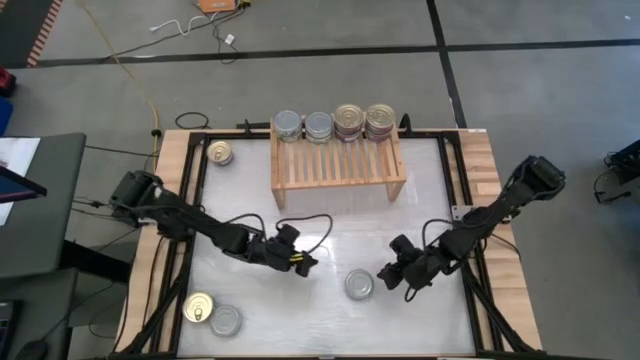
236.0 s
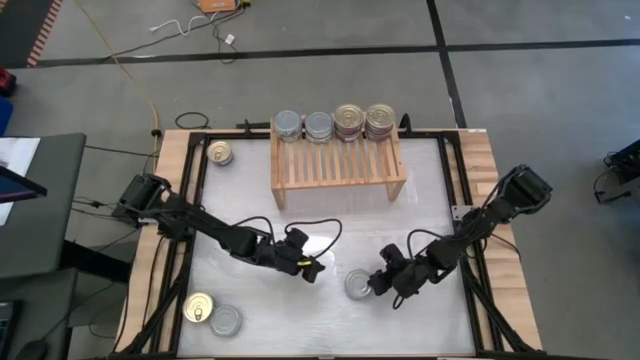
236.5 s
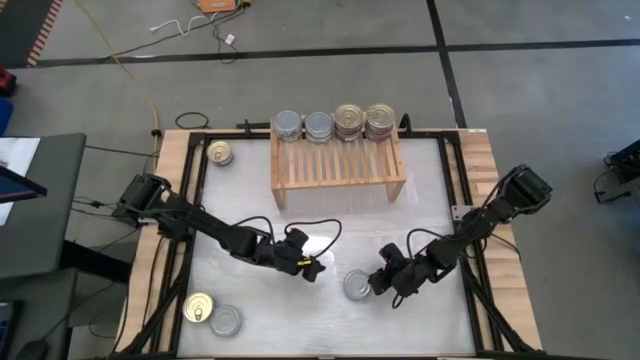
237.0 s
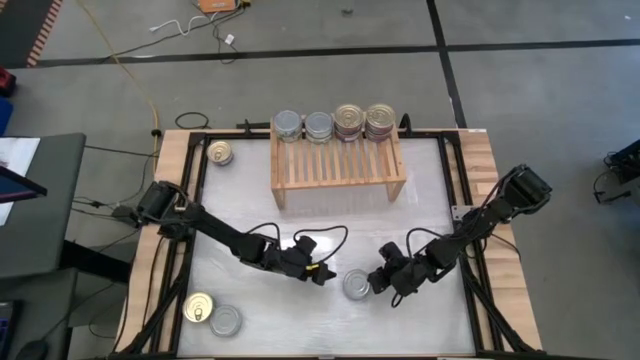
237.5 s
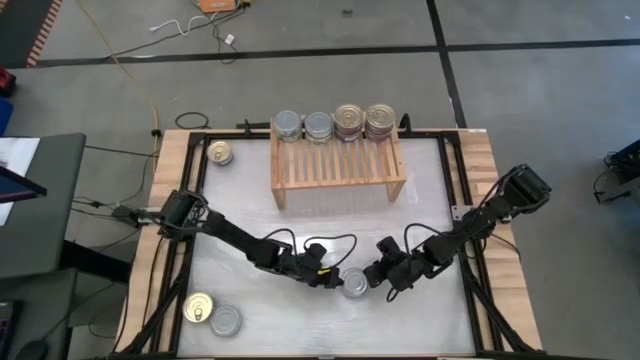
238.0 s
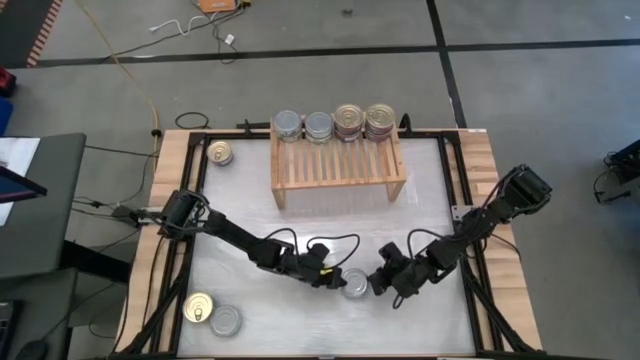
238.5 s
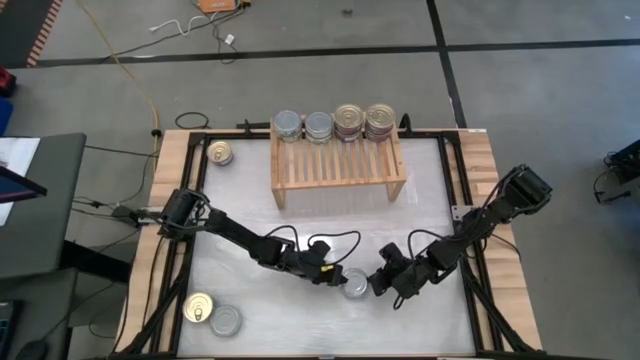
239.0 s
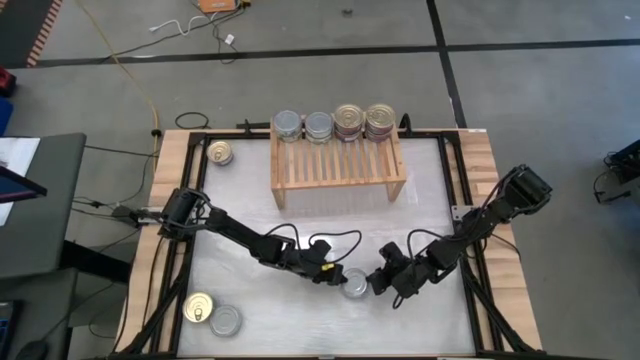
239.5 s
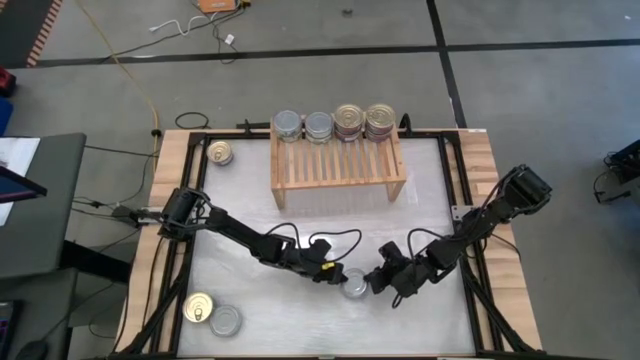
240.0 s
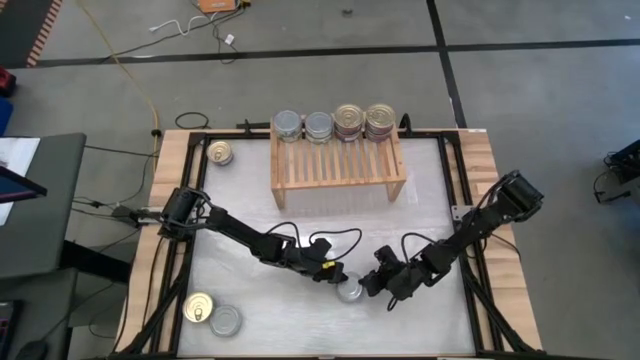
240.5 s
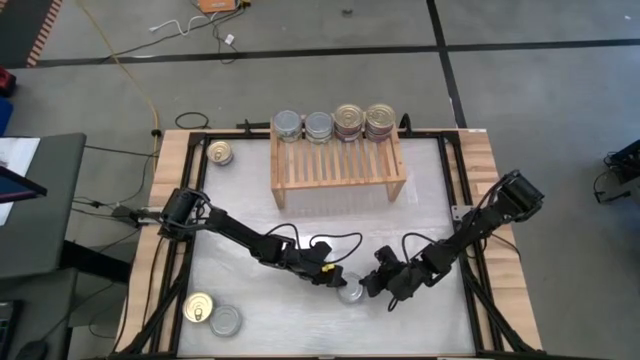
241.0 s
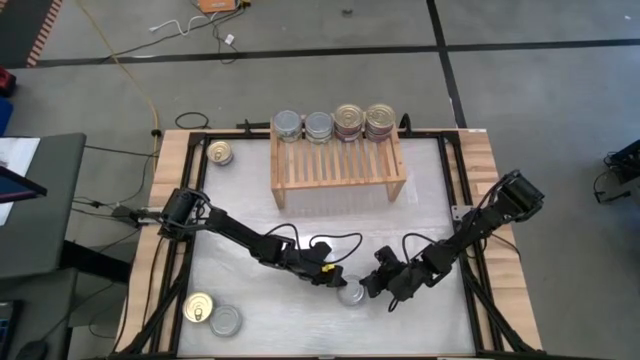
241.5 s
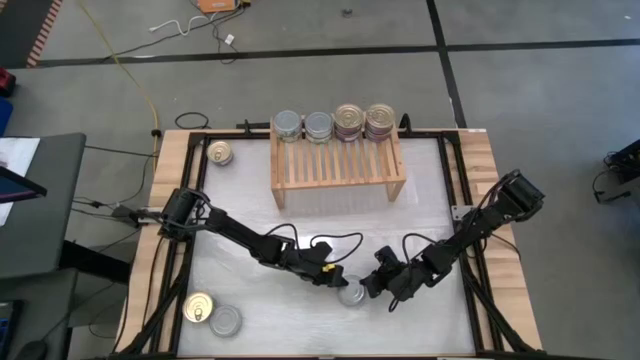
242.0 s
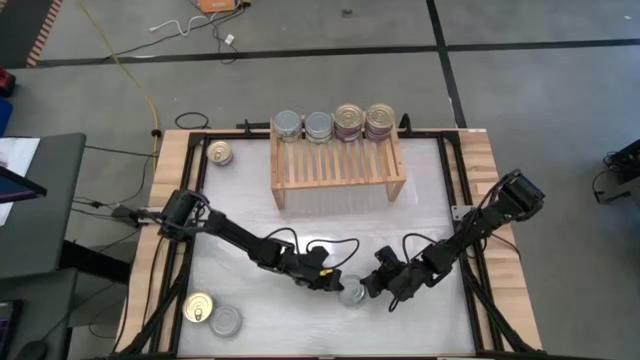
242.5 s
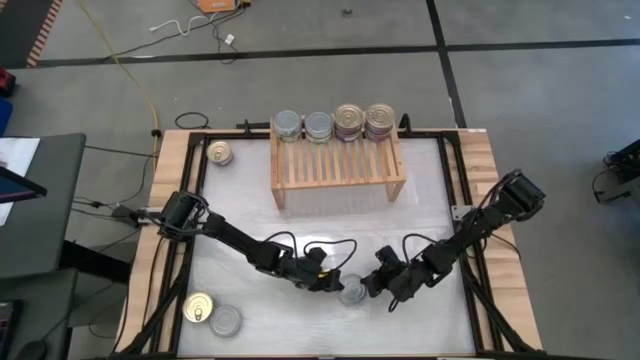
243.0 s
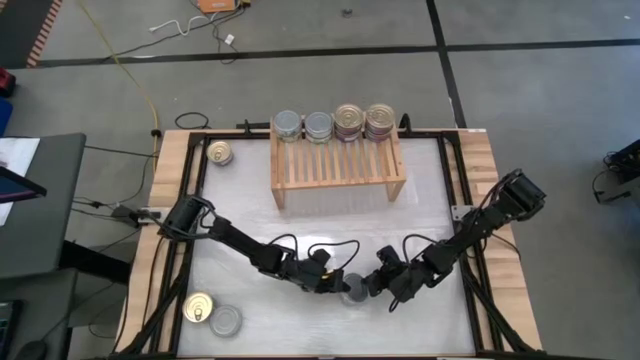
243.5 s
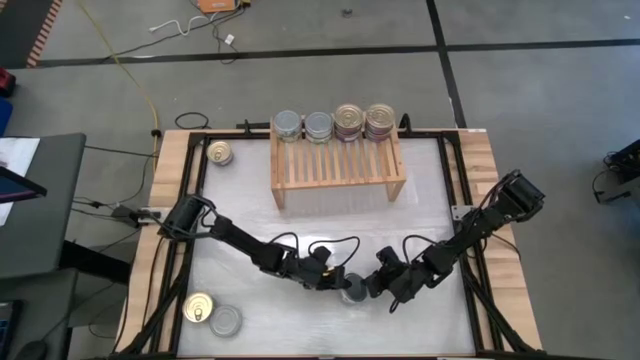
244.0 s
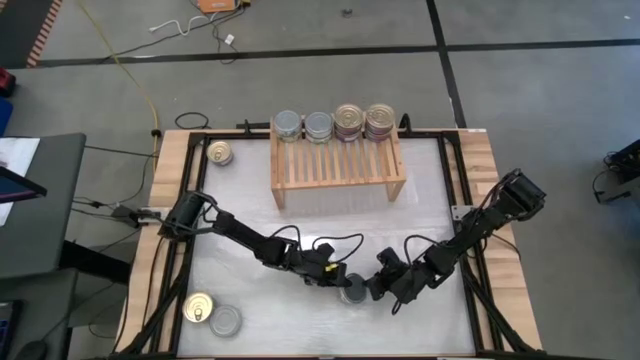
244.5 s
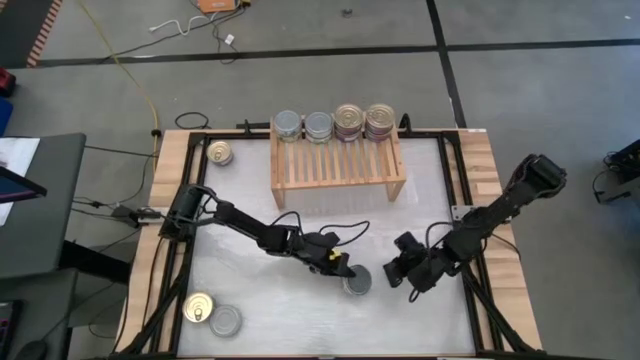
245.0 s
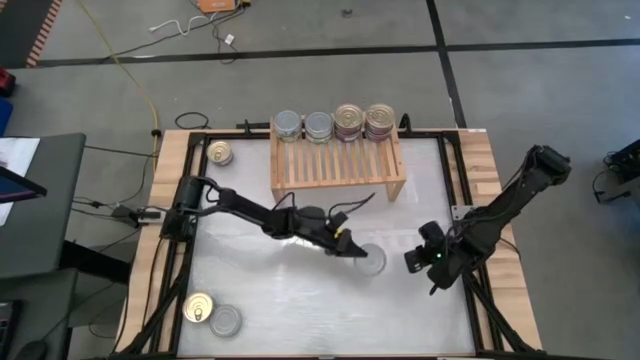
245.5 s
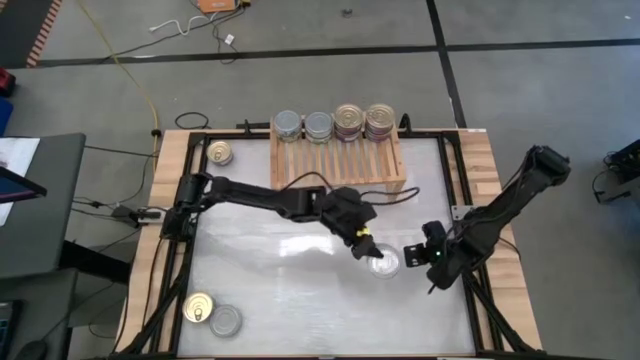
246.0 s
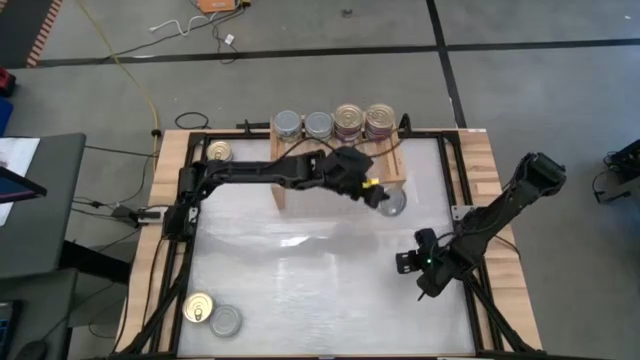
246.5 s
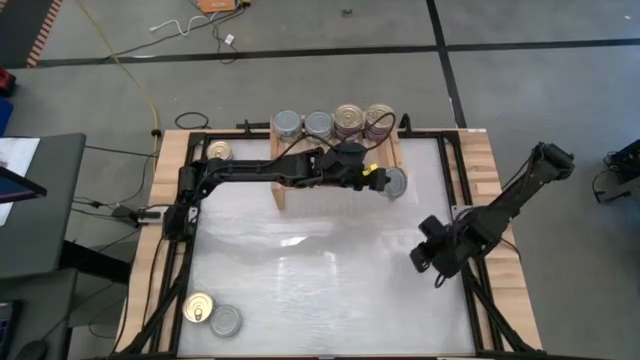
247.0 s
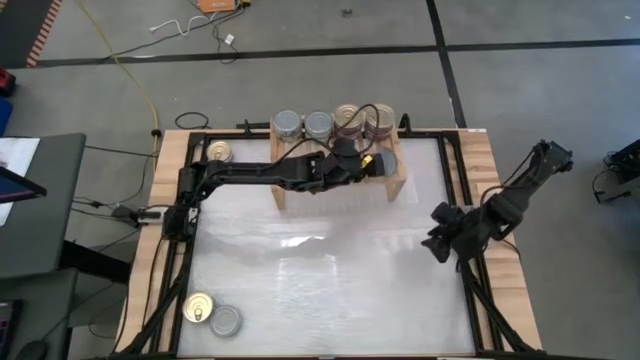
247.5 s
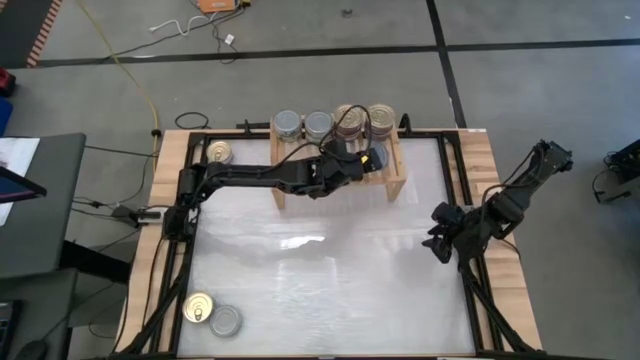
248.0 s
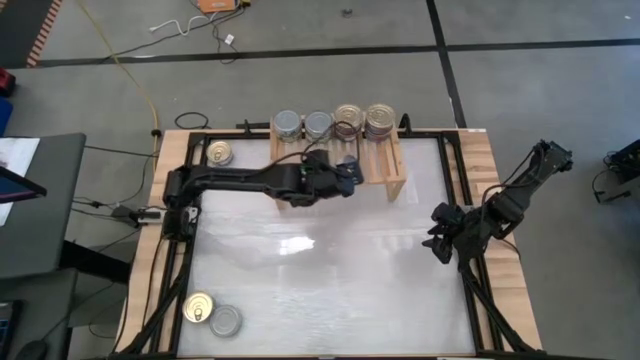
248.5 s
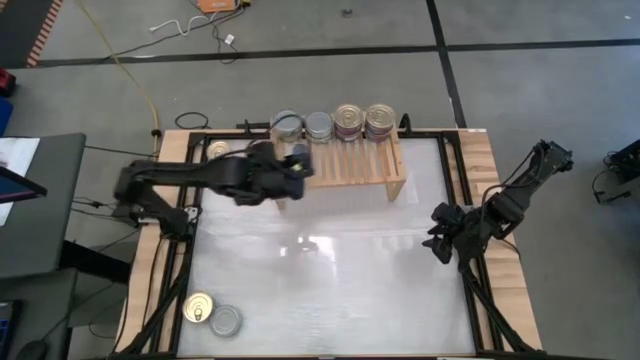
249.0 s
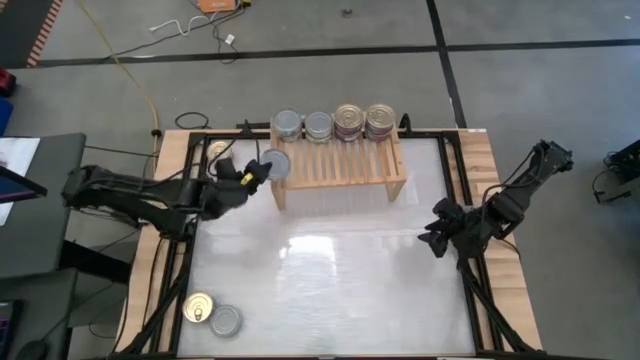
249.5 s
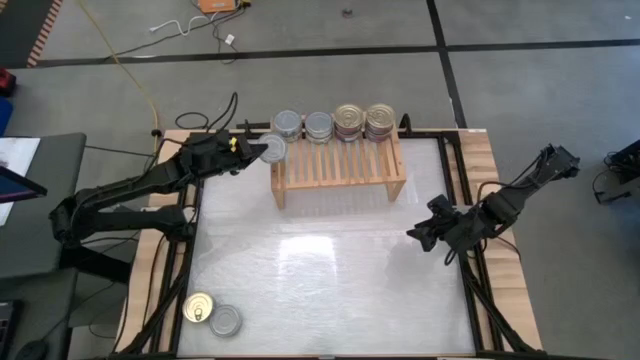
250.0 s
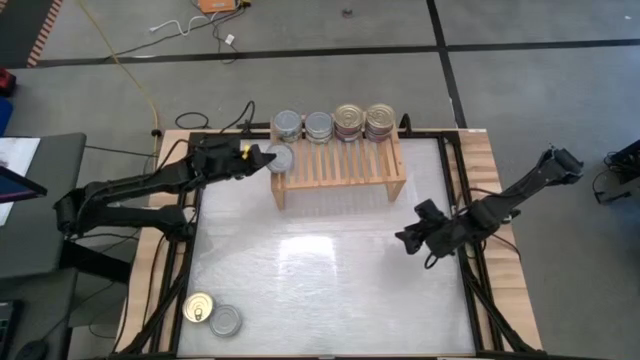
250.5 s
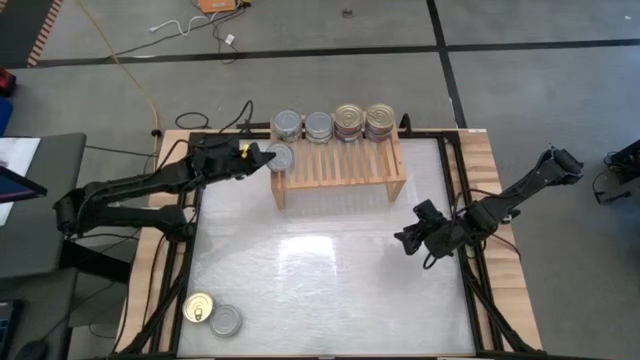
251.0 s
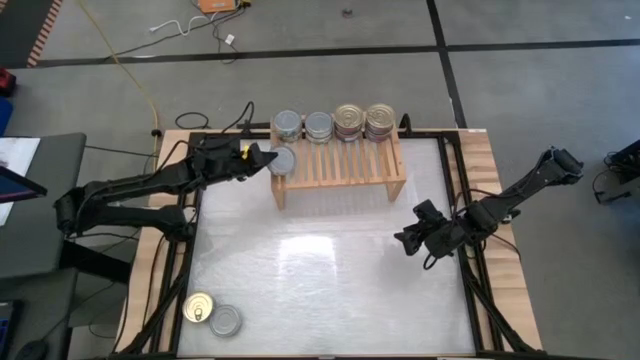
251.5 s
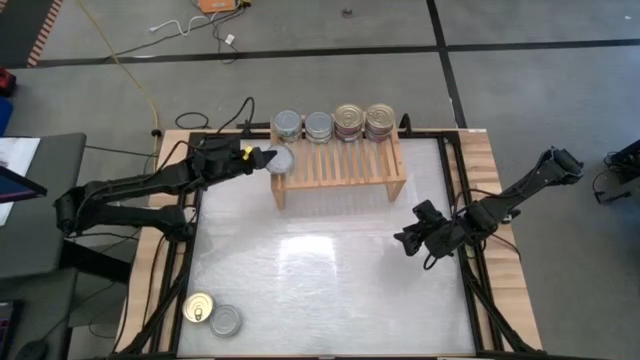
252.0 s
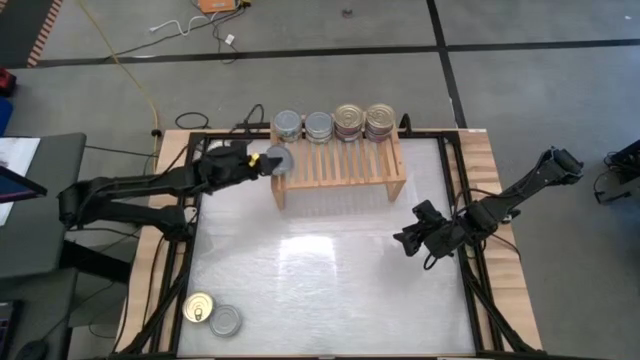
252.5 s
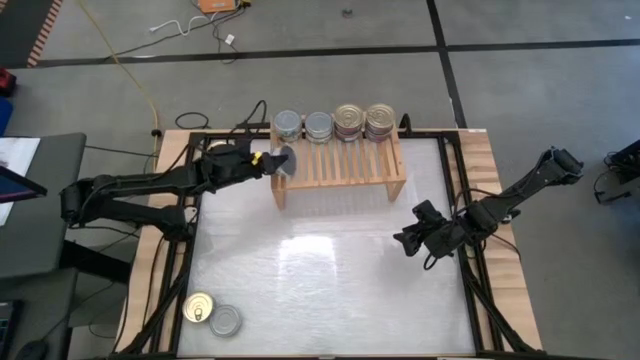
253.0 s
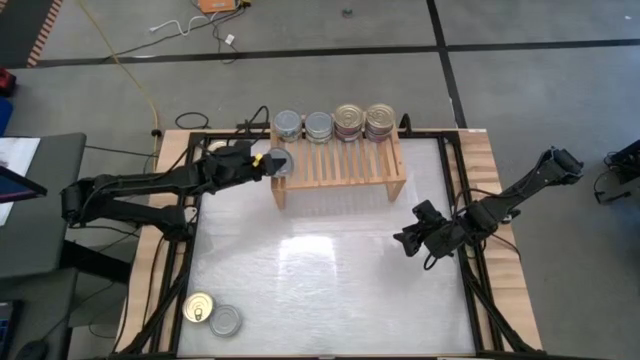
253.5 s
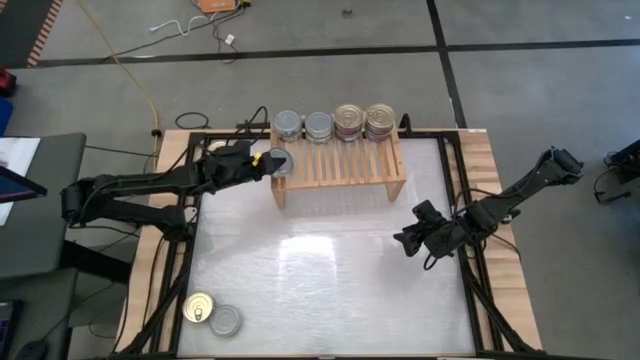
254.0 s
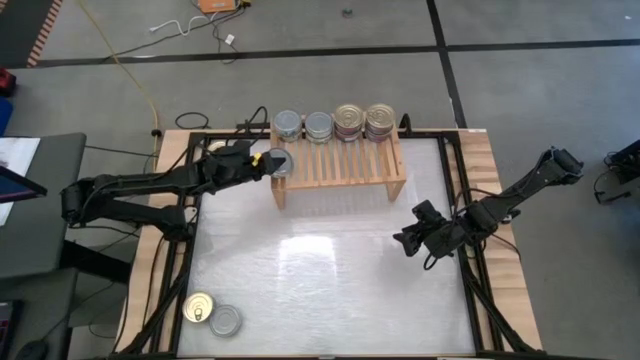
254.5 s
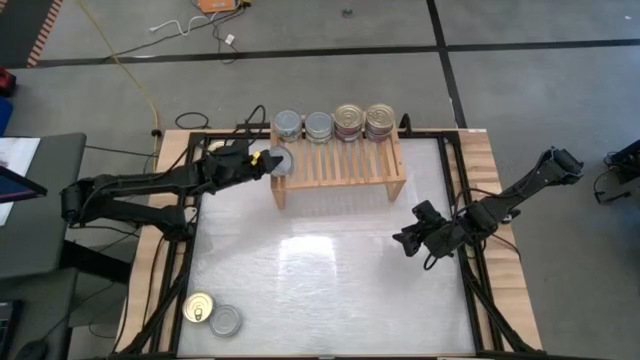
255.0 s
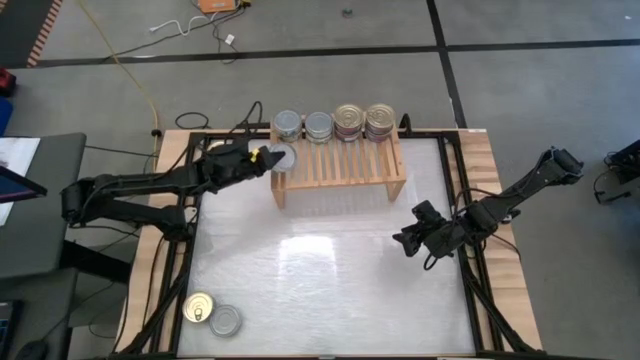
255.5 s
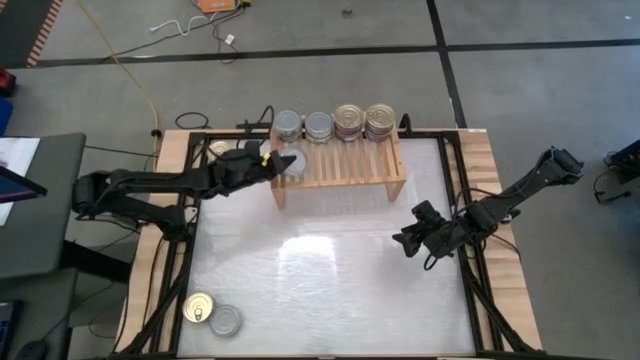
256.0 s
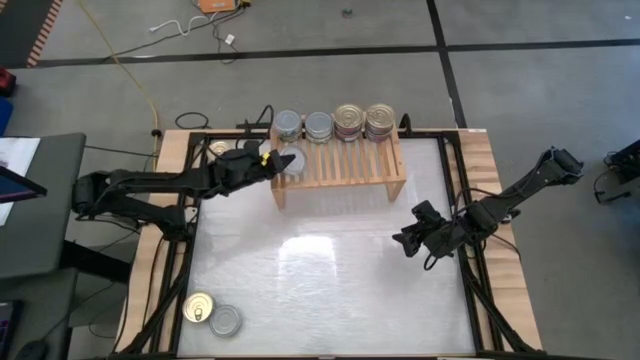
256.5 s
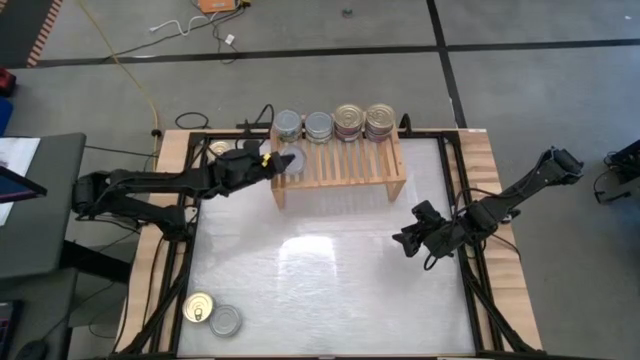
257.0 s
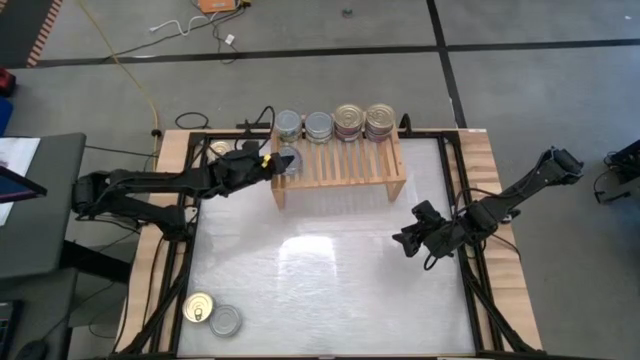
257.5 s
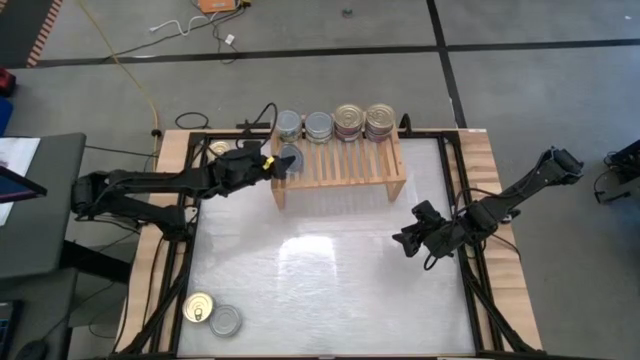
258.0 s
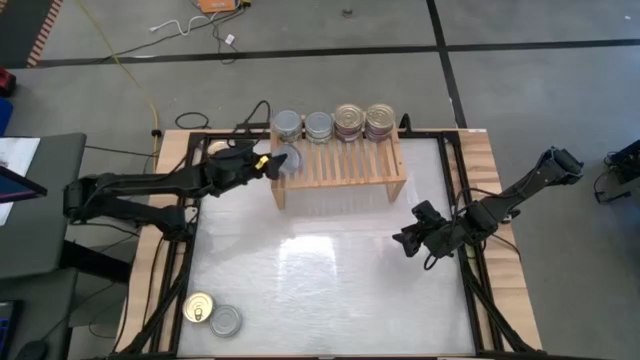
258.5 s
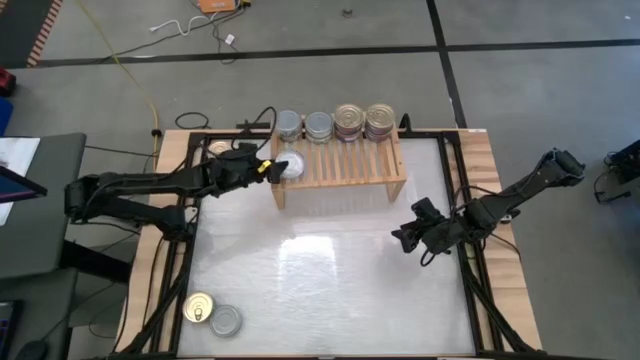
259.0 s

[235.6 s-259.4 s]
Task: Stack canned seafood by type on shelf
Put the green tuna can on the shelf
